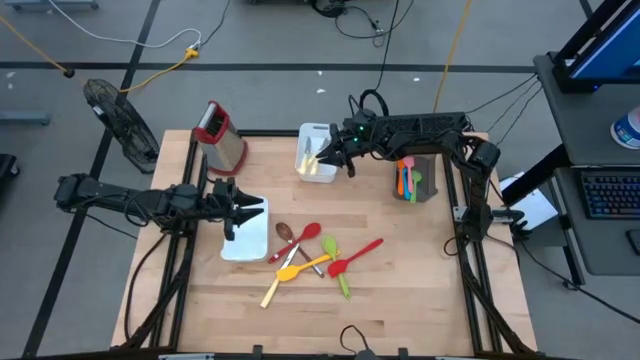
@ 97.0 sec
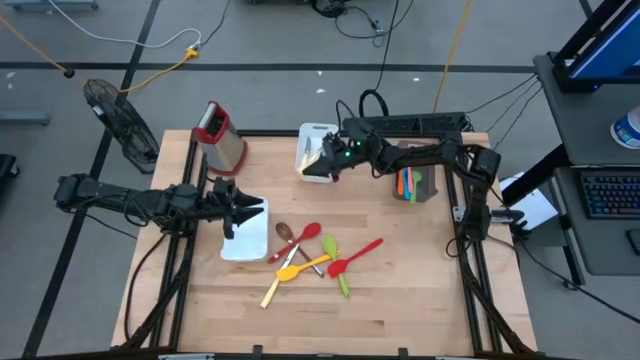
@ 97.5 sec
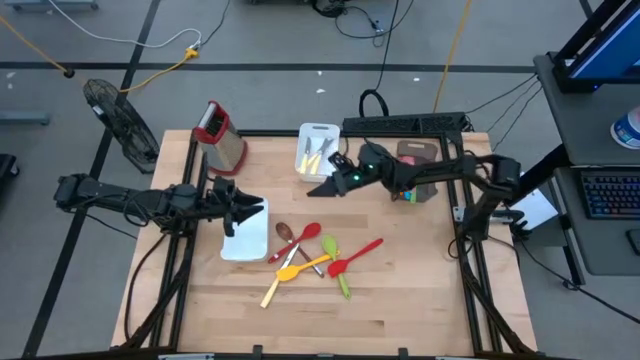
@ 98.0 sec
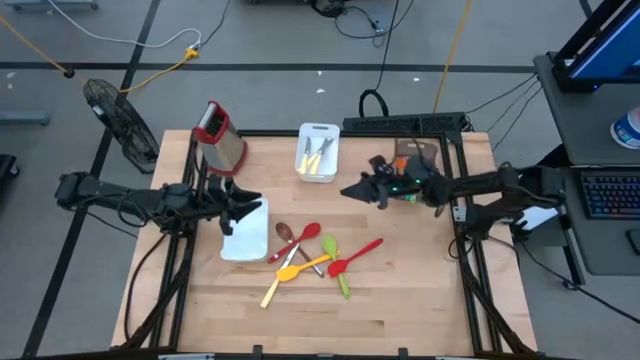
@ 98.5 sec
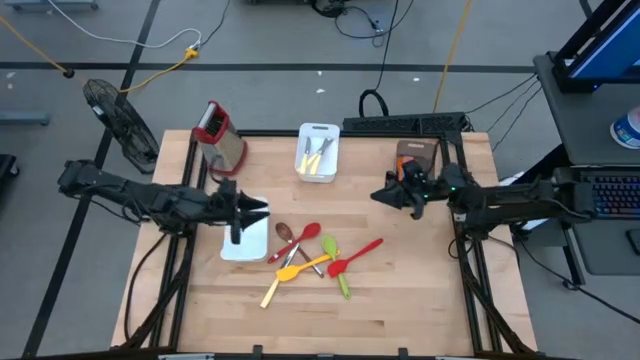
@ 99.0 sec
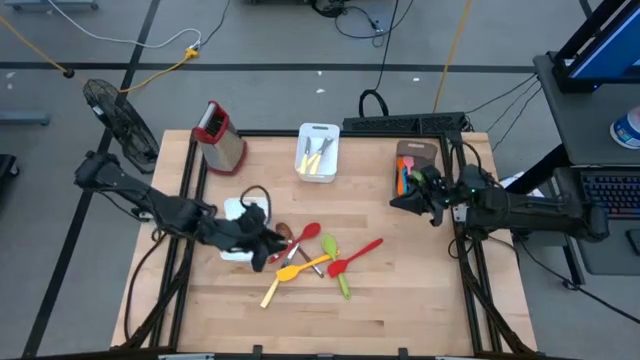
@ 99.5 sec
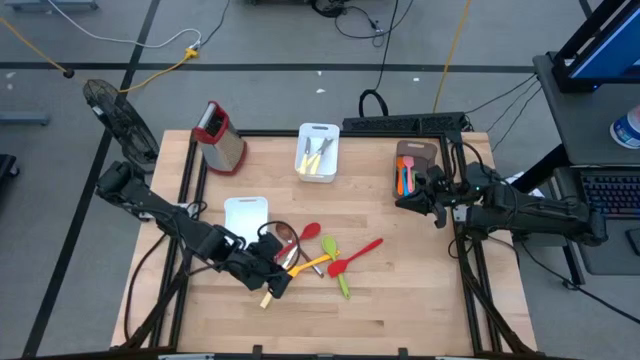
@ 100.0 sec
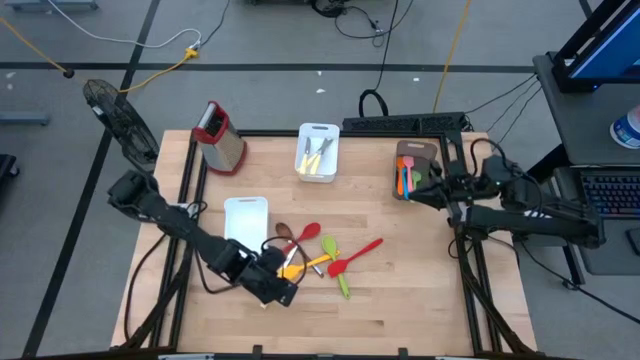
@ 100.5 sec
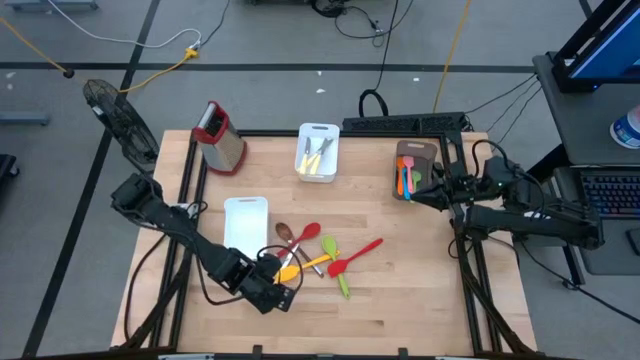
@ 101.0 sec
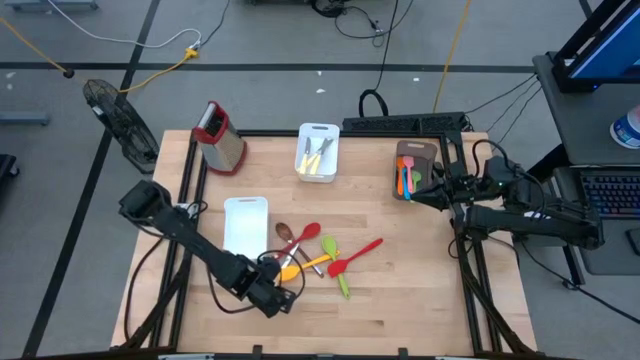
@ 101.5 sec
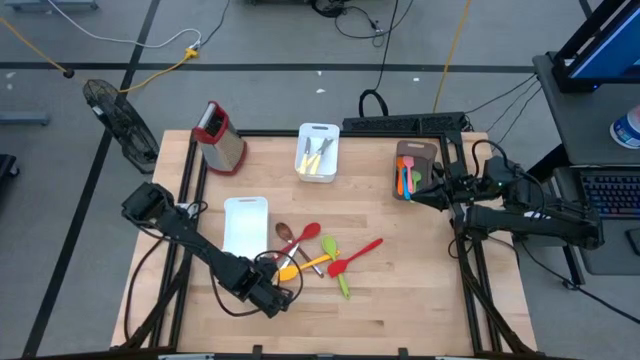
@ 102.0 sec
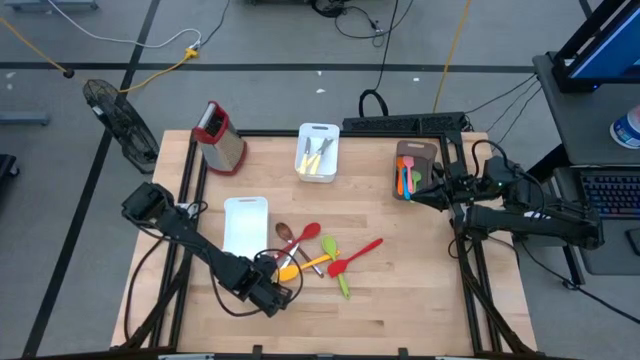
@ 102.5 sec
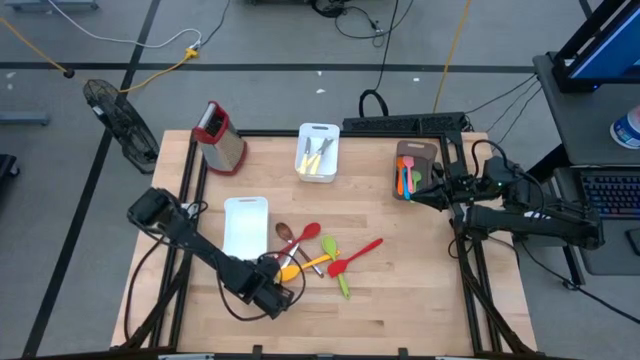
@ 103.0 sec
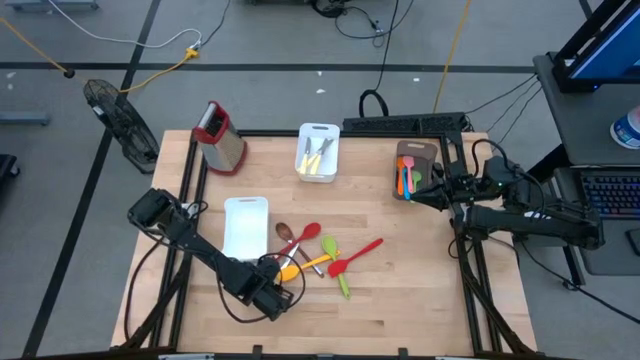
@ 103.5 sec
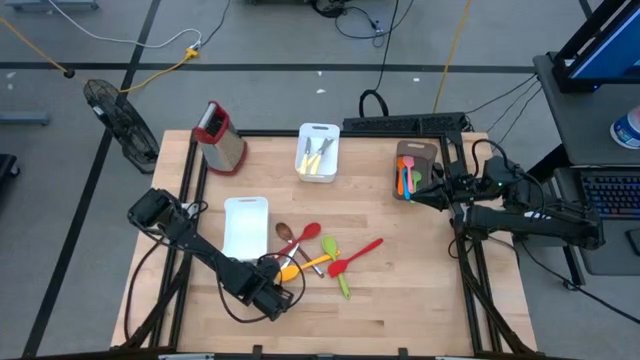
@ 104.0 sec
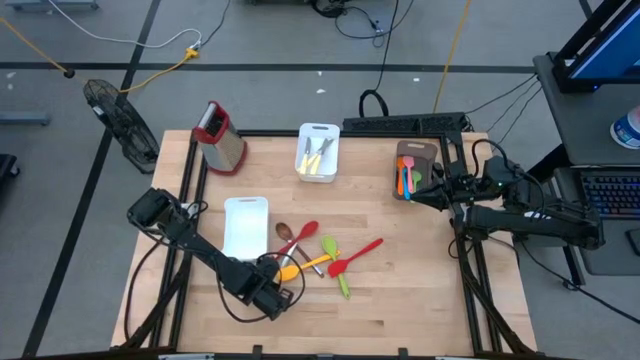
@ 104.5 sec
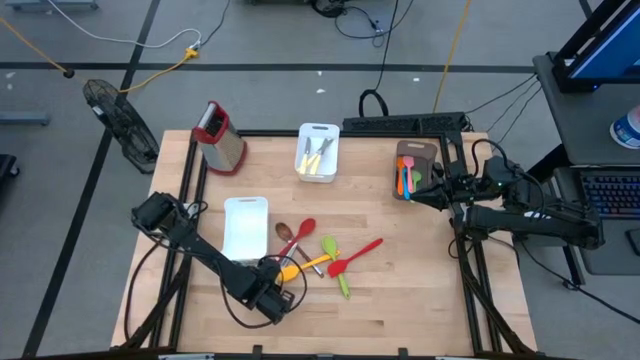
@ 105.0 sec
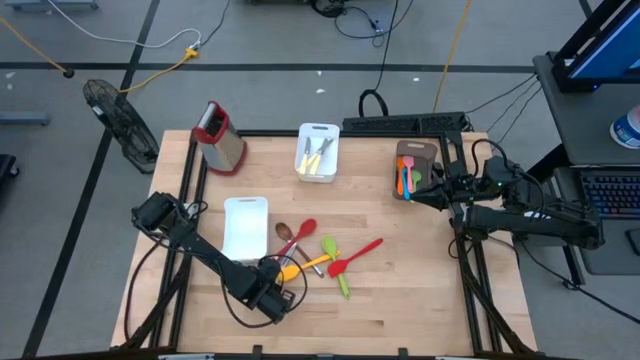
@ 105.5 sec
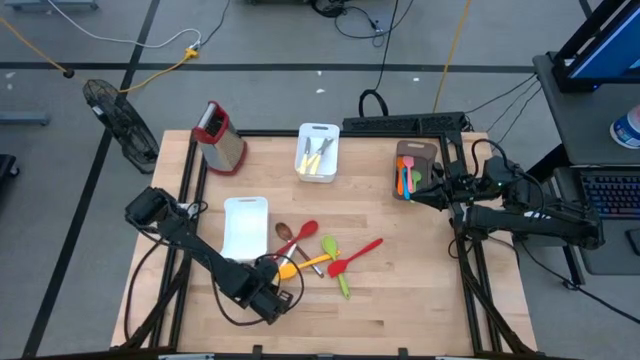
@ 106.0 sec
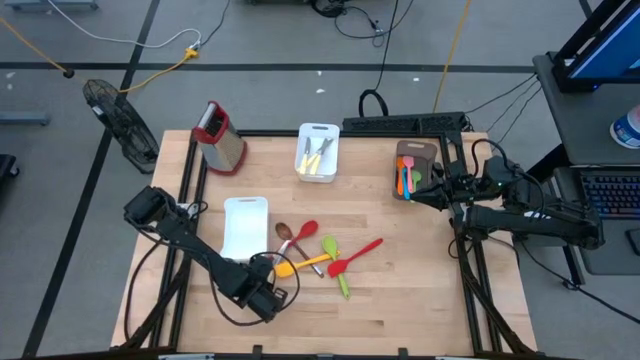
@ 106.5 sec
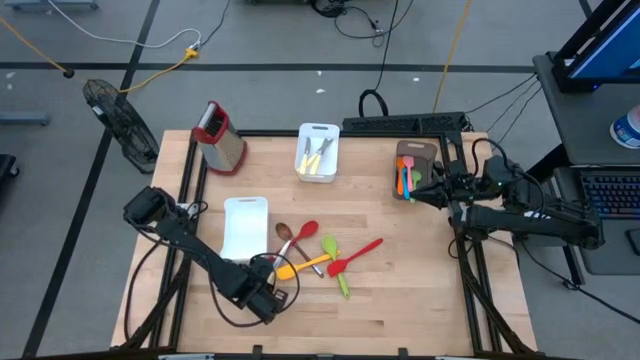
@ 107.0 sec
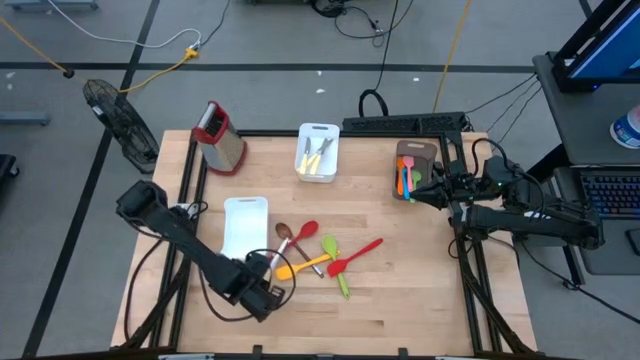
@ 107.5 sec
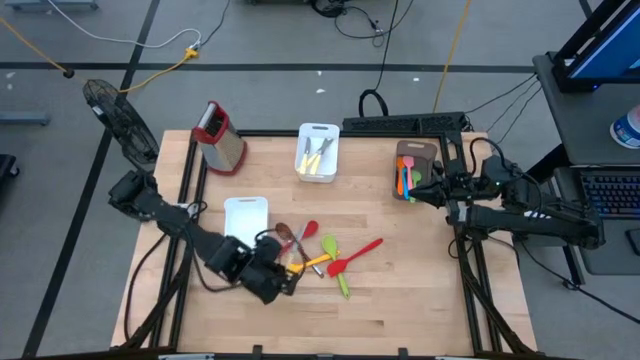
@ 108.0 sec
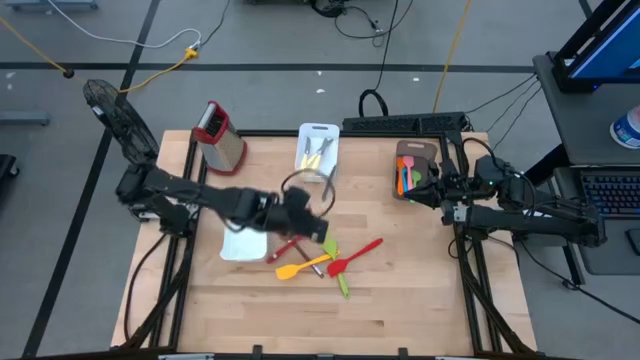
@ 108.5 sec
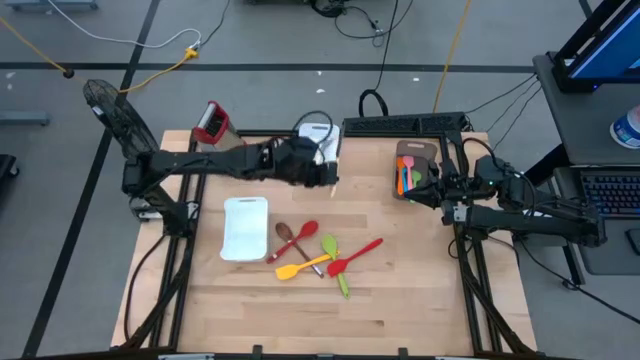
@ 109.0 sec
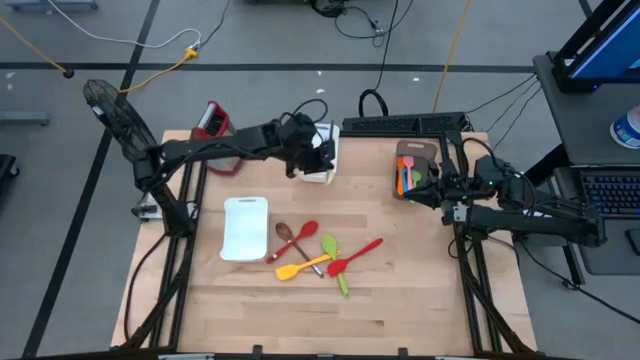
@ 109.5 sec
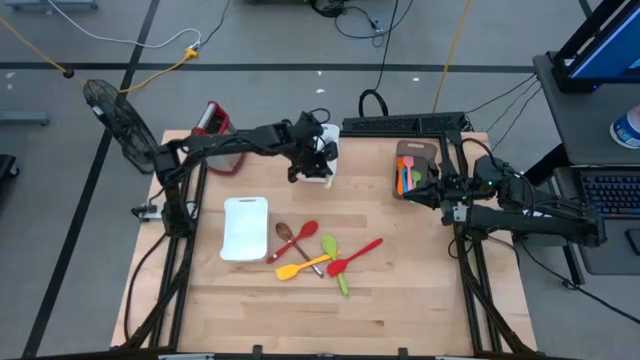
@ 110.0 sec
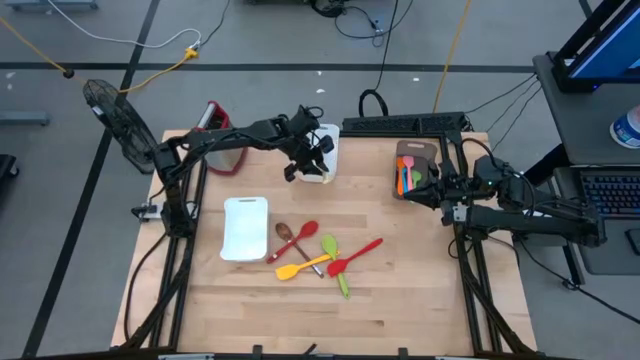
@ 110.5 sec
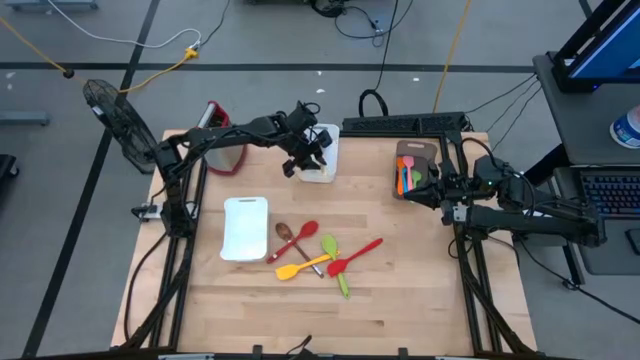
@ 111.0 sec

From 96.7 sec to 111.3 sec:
Task: Pick & Place Kitchen Items
Put the yellow knife into the top white bin

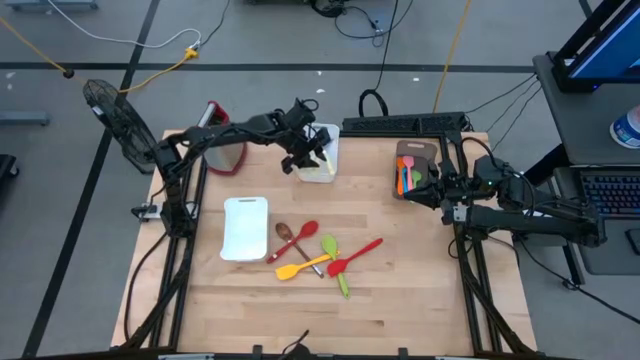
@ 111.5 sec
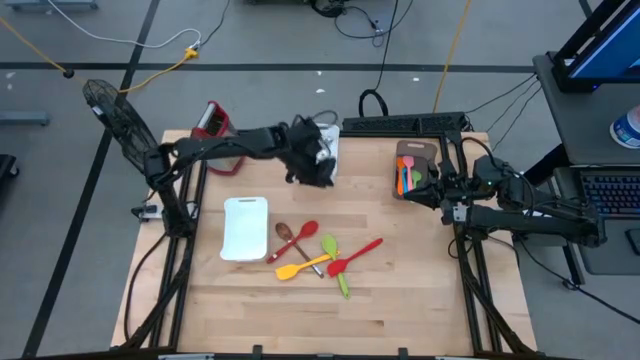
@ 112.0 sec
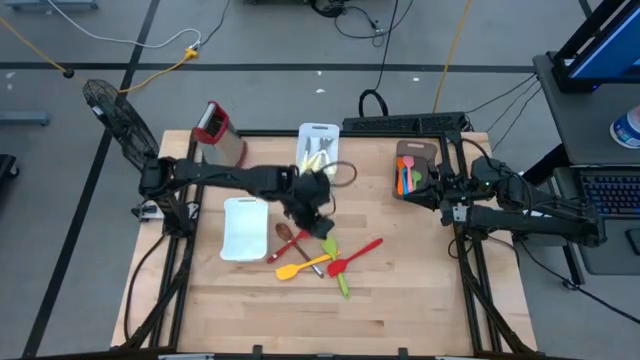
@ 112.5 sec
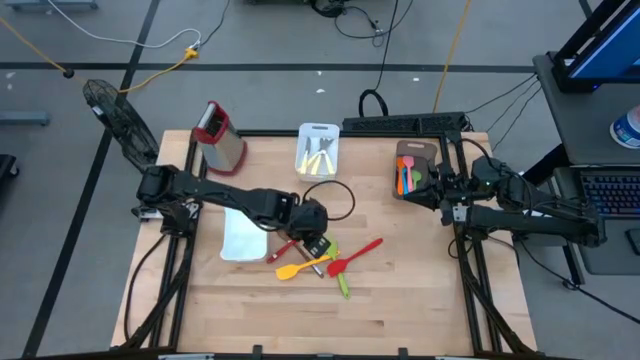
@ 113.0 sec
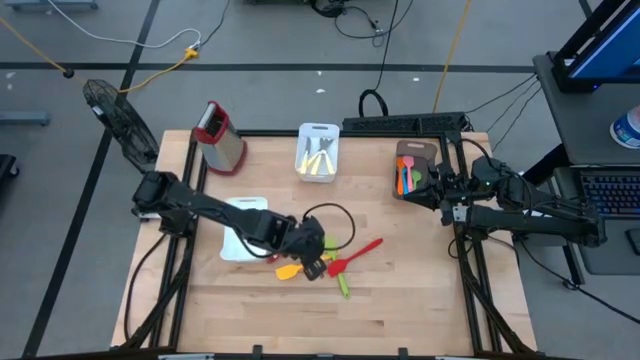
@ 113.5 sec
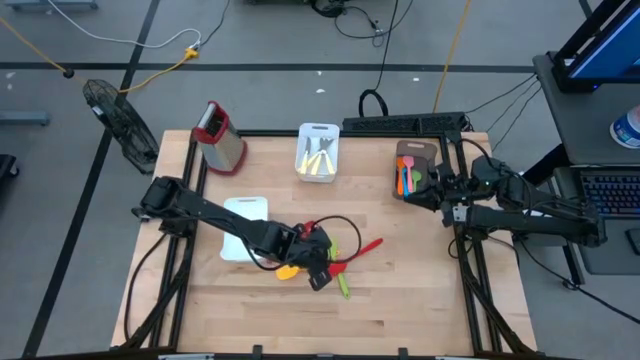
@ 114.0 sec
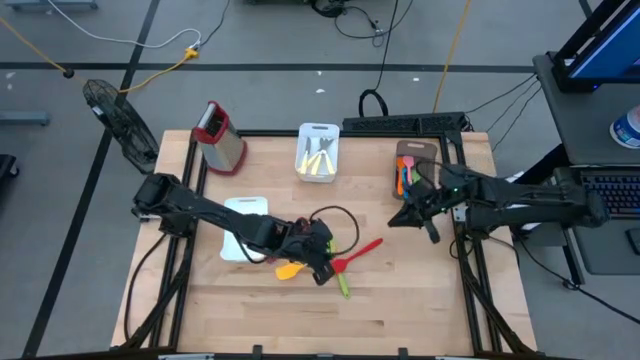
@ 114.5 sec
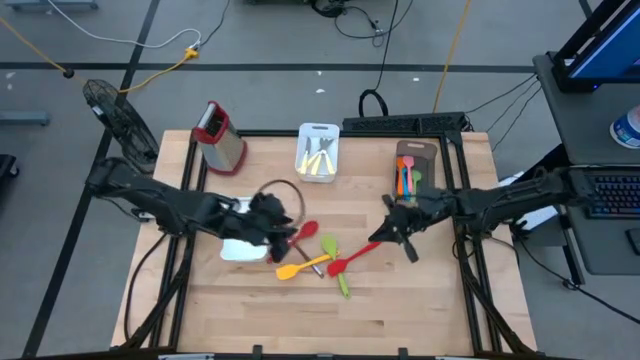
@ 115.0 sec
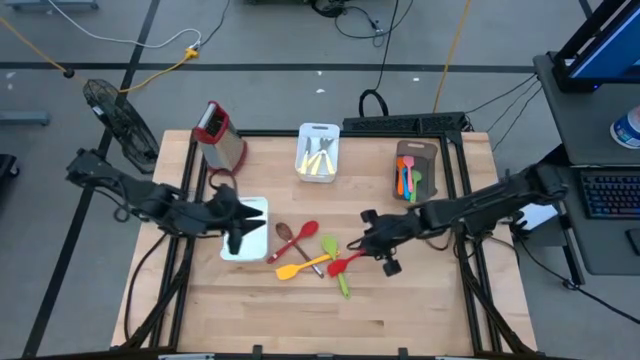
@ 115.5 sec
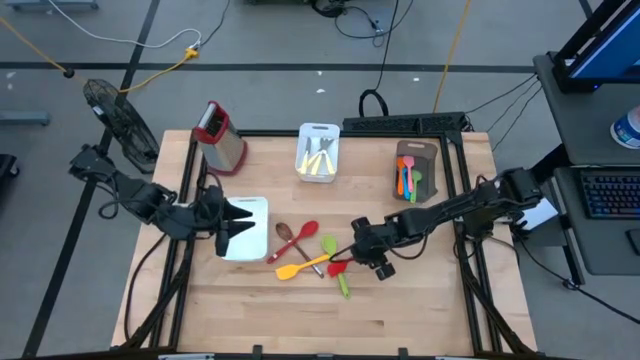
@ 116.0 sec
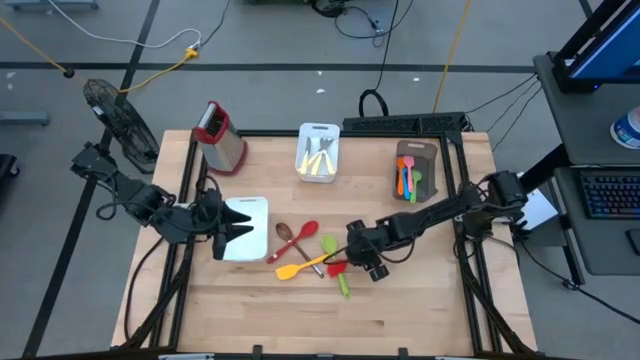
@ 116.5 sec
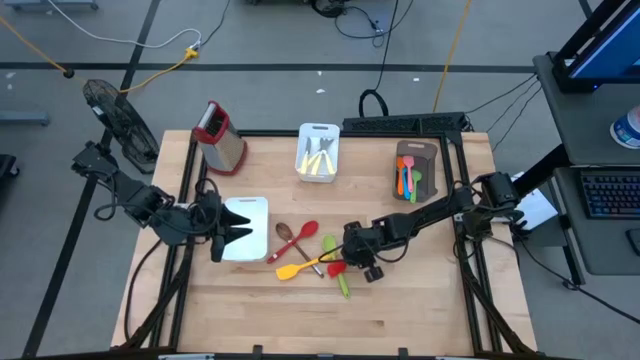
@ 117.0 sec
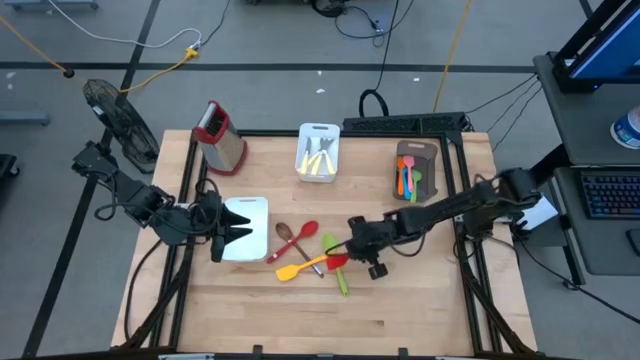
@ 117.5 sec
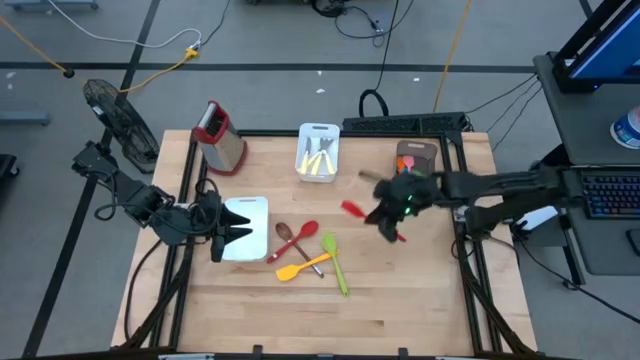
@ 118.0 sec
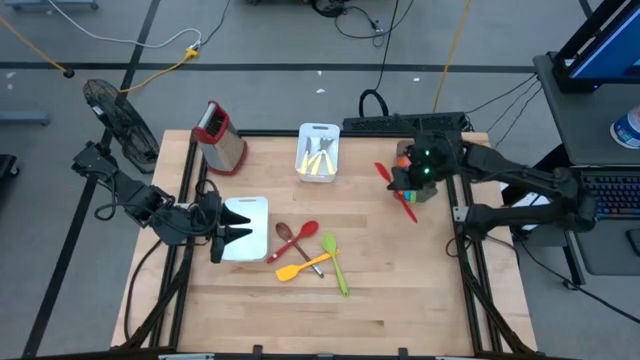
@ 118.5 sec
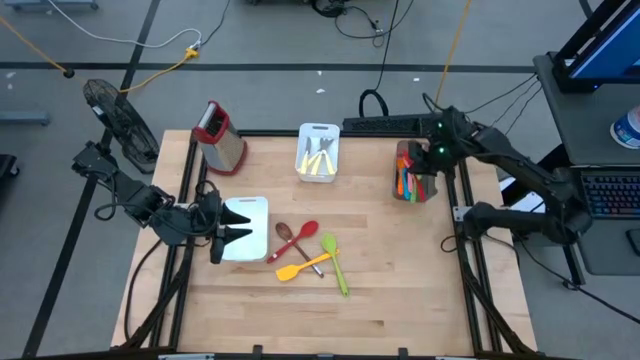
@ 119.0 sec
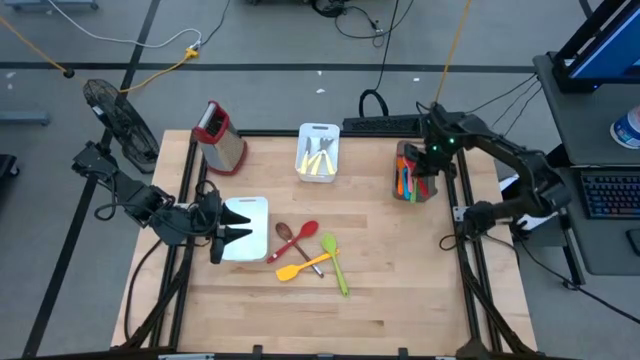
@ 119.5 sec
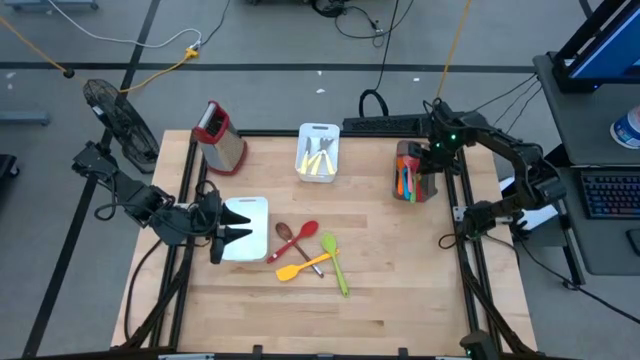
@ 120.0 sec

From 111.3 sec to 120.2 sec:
Put the red spatula into the black bin
